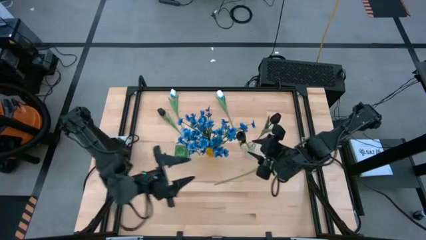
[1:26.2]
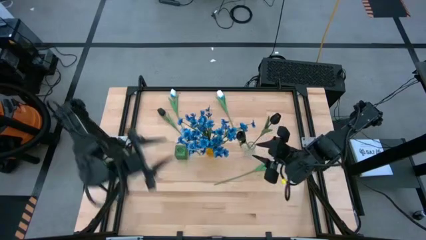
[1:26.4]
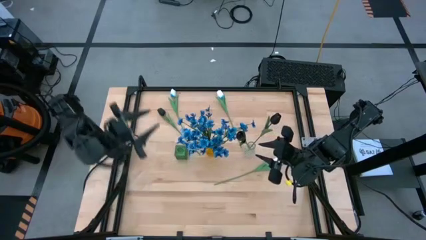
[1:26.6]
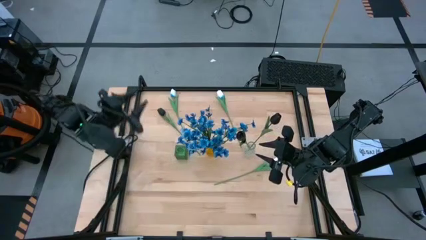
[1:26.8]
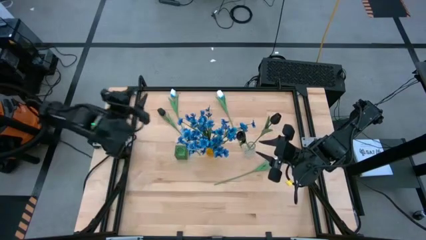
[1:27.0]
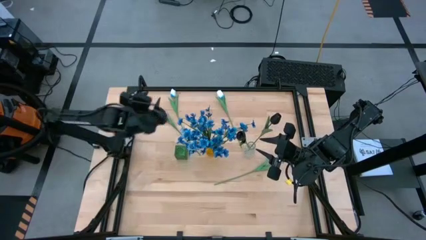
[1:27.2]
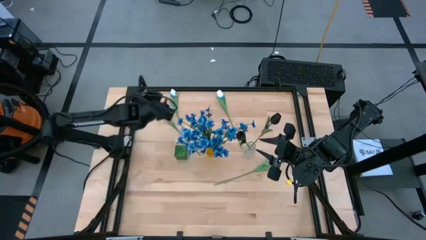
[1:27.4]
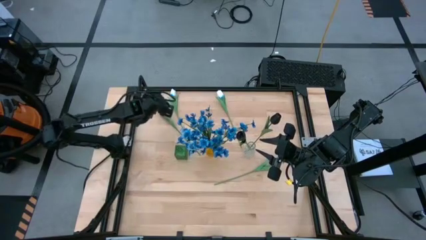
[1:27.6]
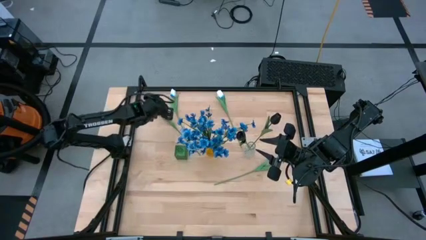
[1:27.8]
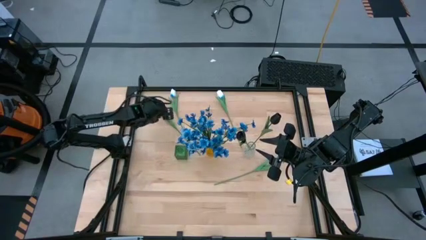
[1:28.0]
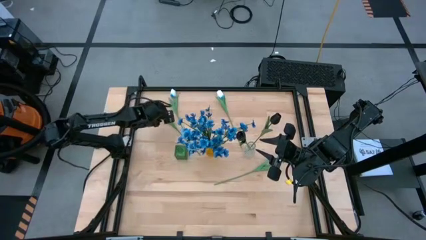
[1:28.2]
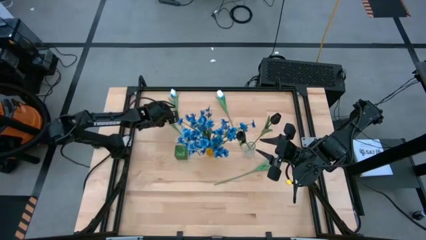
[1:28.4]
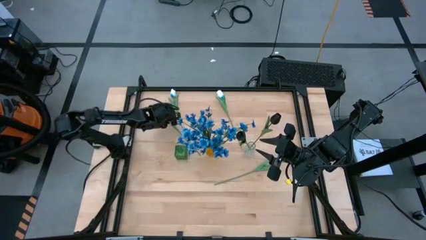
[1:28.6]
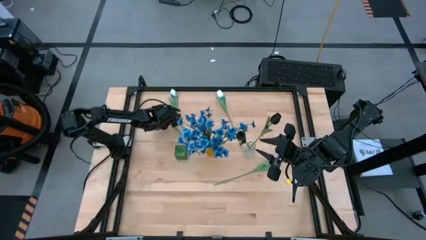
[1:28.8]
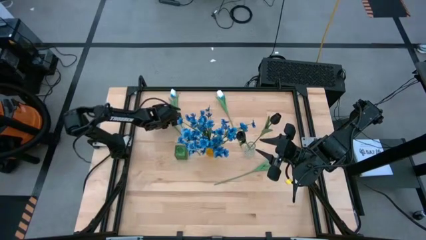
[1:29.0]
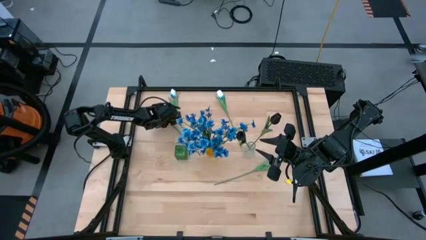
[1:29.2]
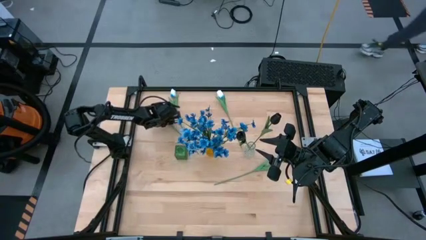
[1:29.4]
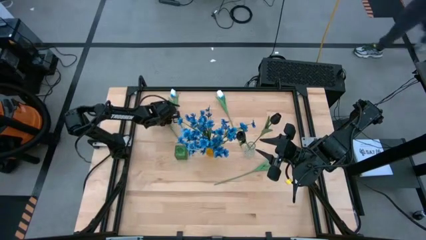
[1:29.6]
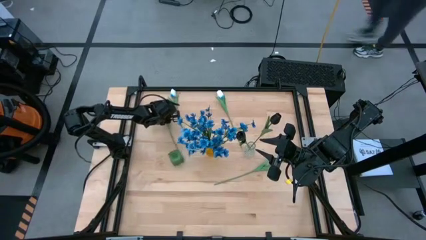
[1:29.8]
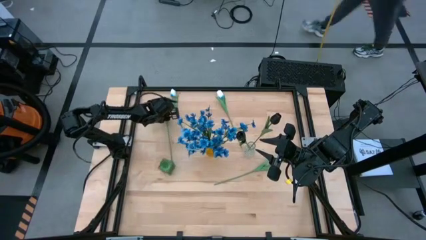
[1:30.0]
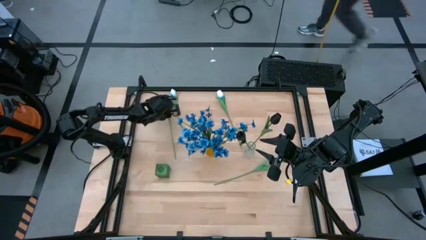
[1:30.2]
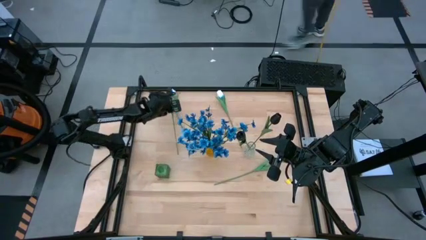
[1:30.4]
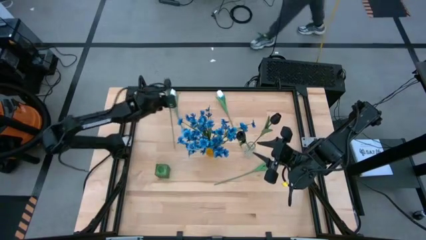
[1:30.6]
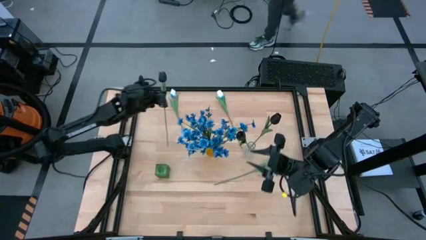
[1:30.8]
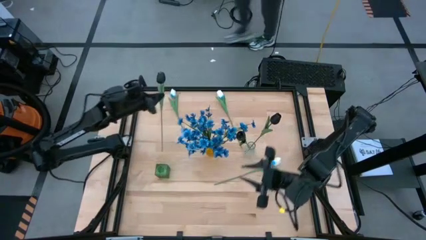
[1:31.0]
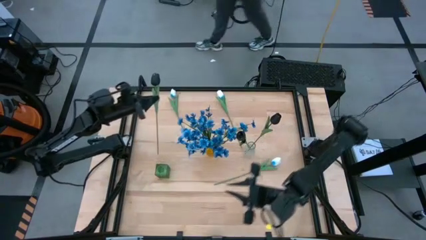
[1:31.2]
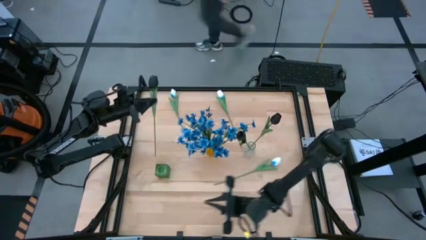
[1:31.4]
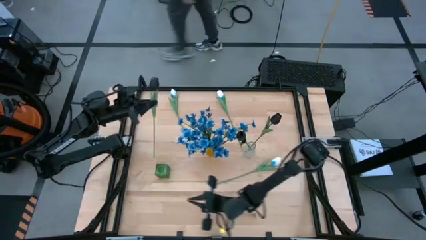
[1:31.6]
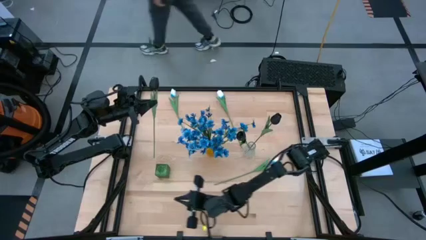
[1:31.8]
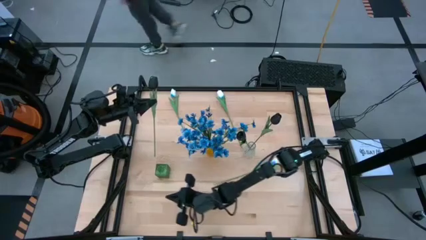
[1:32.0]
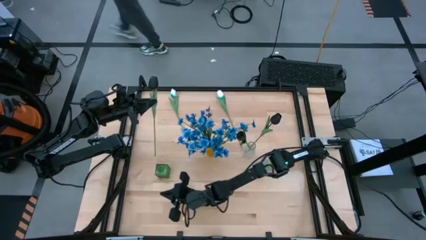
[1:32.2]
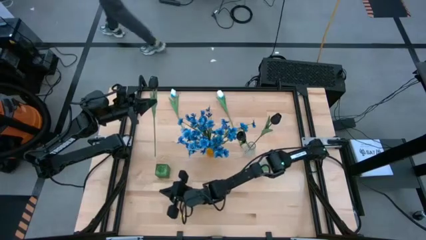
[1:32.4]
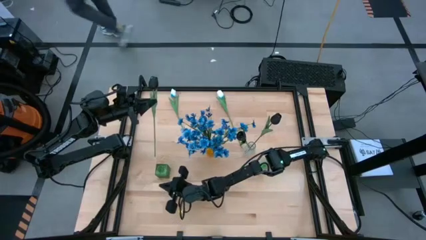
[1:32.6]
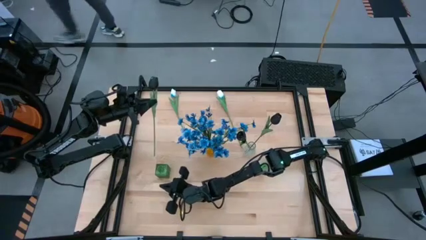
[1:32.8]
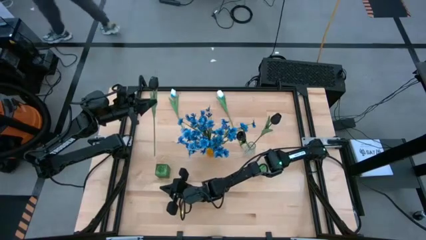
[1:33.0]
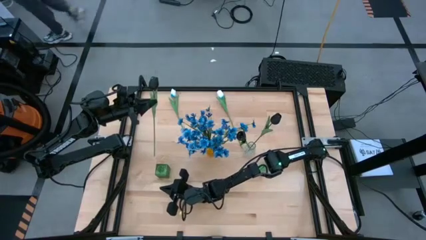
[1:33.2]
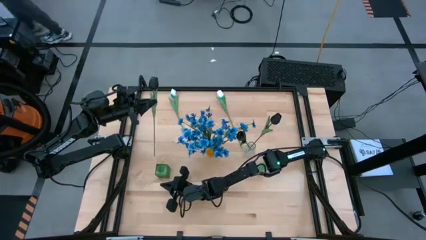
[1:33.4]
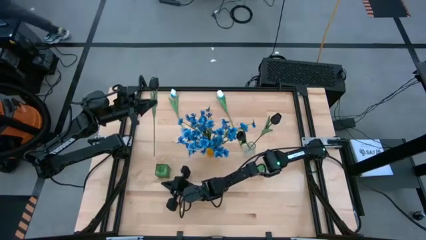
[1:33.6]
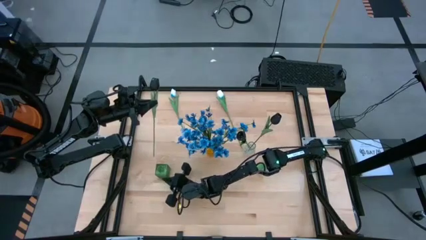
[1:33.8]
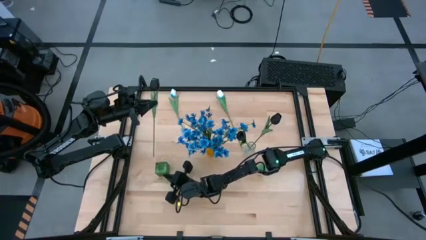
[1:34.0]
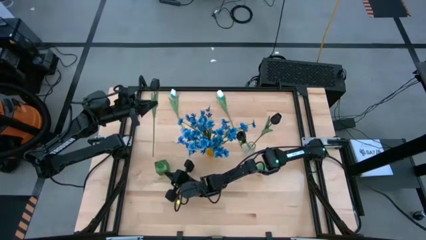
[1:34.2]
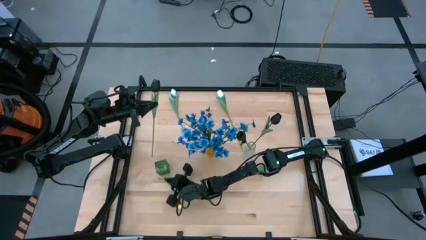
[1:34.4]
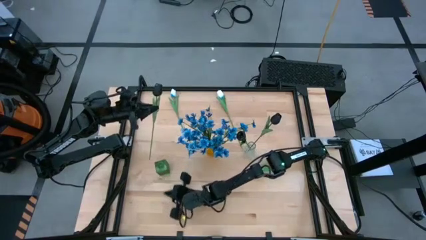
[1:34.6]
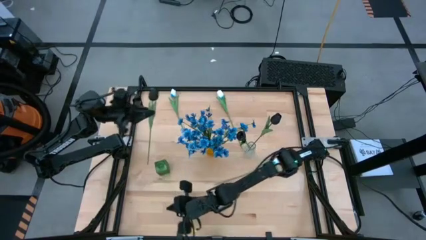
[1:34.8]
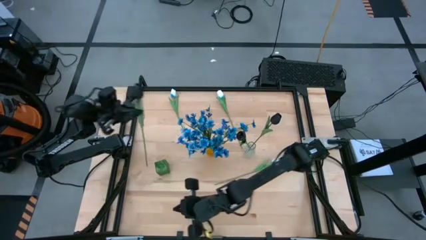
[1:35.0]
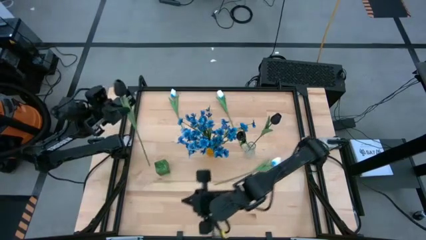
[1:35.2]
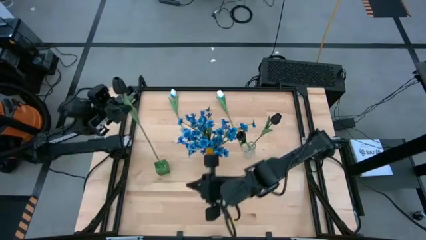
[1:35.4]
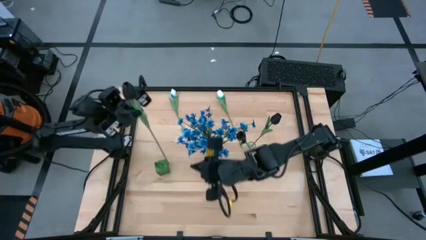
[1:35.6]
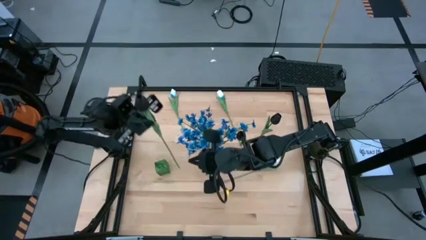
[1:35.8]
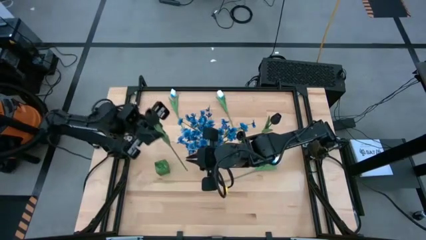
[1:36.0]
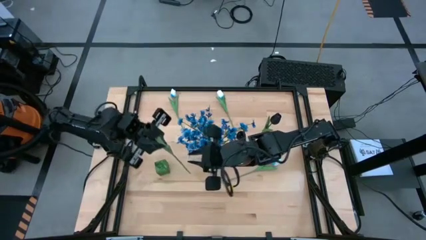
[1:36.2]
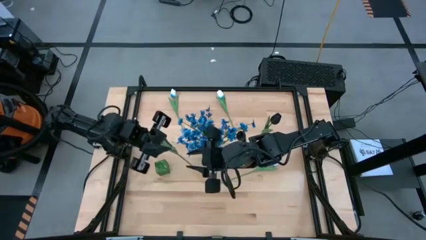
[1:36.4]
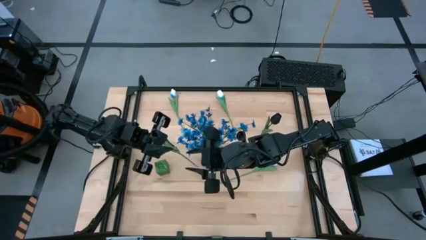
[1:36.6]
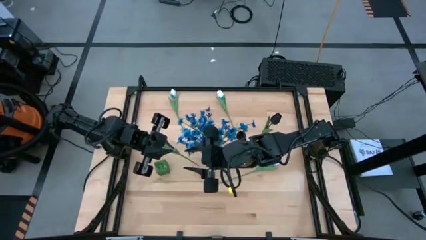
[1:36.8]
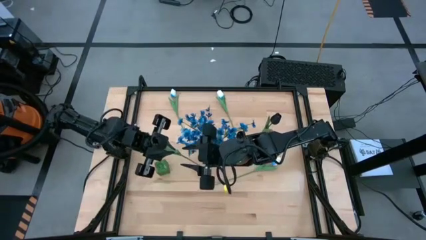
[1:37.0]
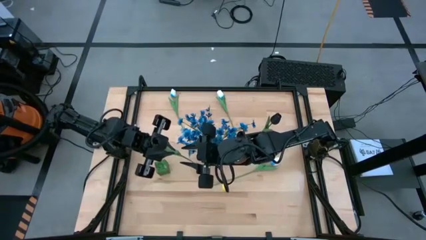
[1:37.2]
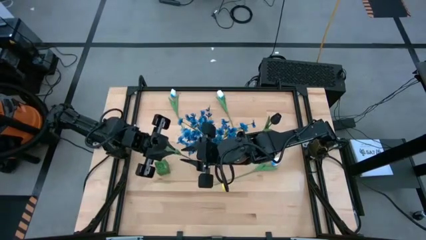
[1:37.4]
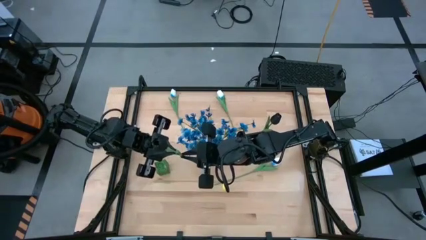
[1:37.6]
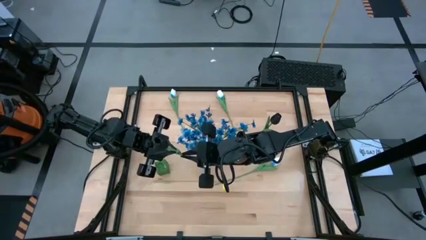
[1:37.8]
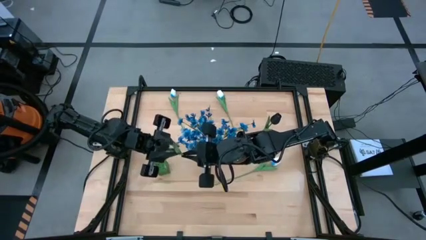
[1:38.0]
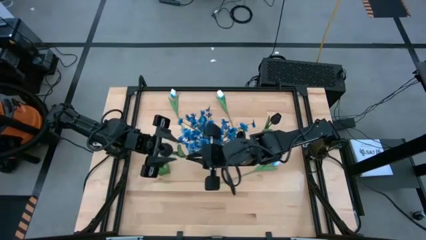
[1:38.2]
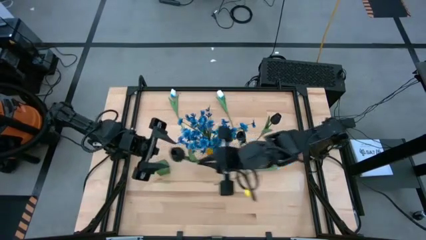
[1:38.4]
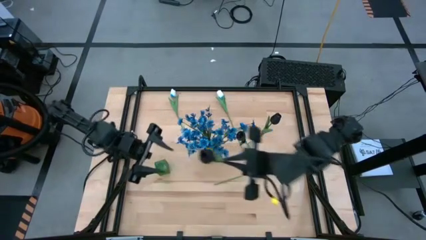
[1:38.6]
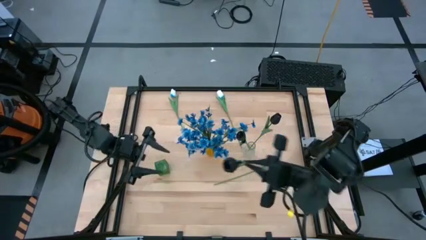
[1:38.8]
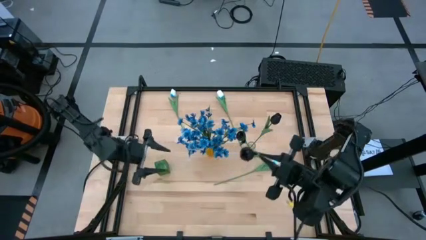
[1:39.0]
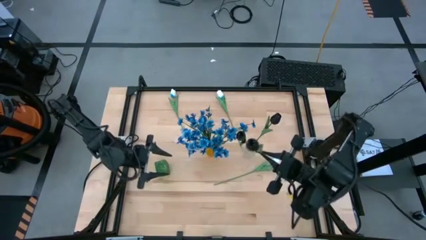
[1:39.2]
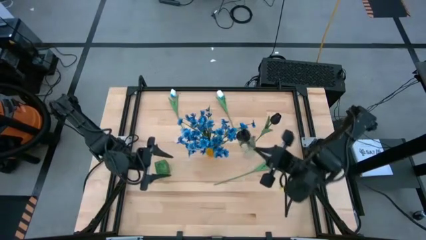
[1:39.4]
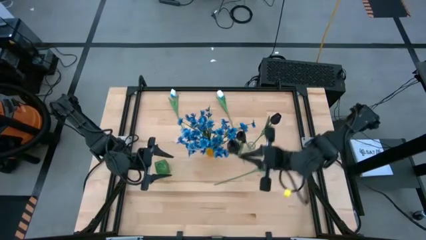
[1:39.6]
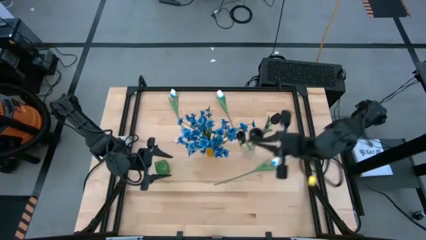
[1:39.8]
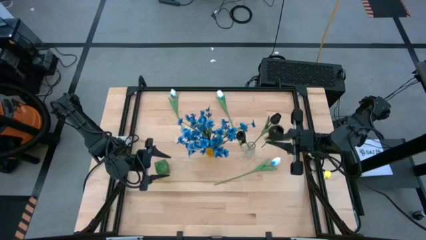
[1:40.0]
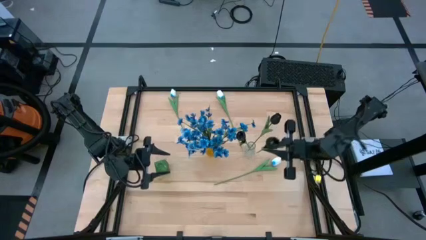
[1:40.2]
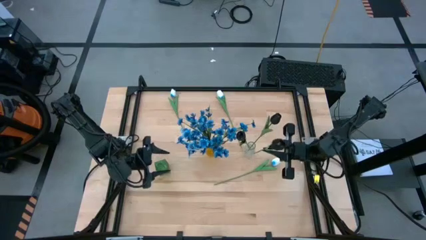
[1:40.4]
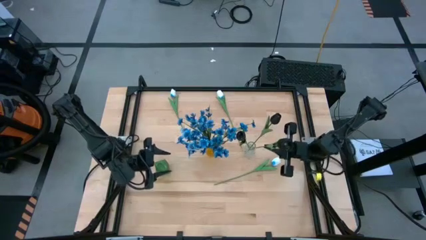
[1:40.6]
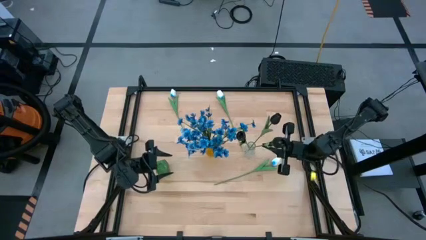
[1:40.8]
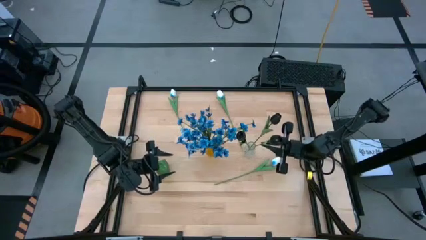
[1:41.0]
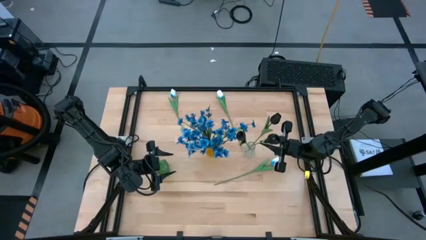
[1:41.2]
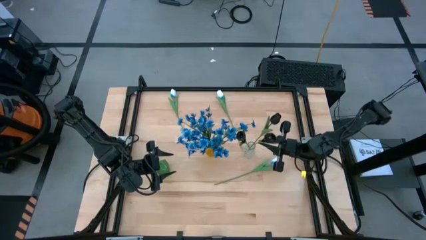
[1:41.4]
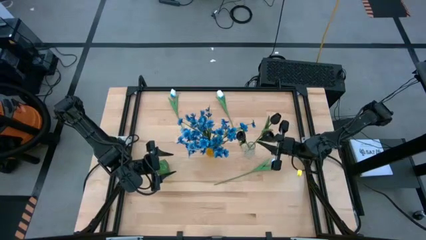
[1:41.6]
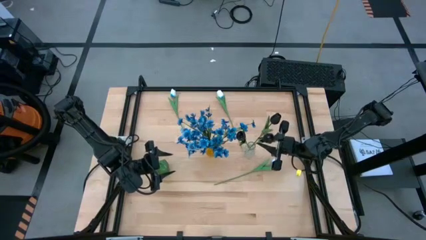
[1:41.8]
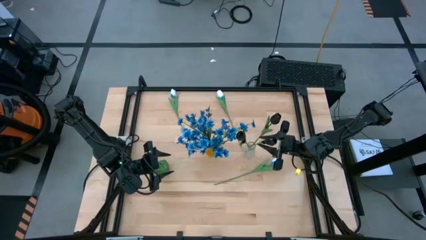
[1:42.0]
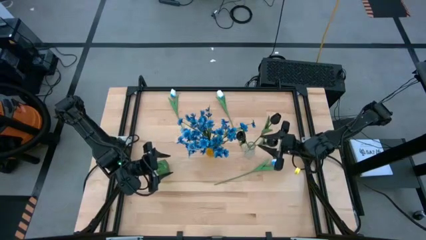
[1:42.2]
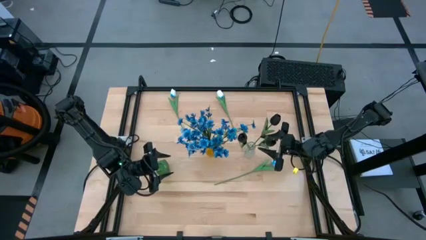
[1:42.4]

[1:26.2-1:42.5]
Task: Sort flowers into vase by color
Put the black flower into the transparent vase

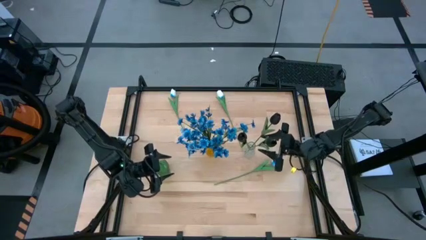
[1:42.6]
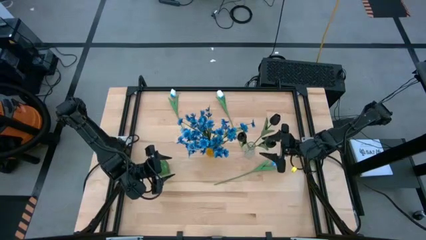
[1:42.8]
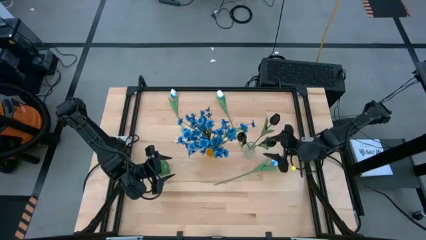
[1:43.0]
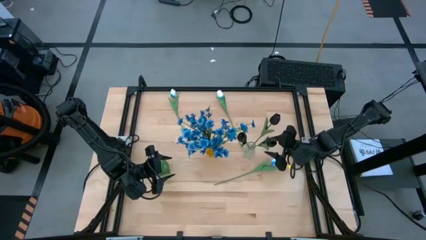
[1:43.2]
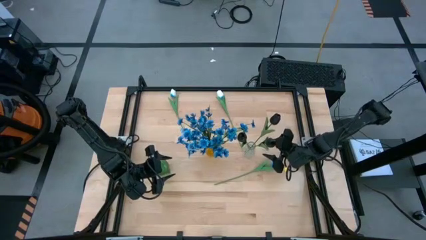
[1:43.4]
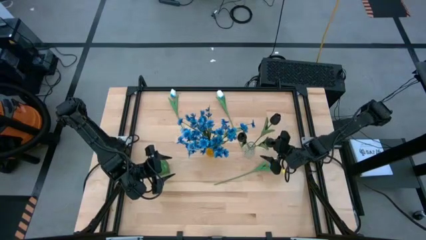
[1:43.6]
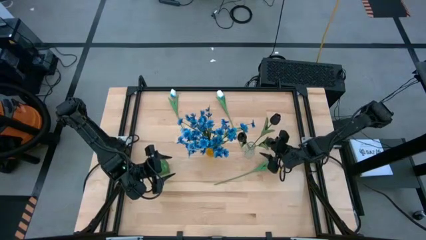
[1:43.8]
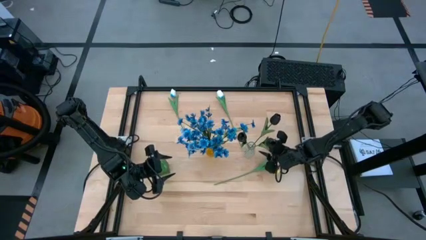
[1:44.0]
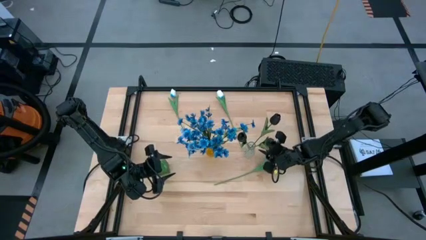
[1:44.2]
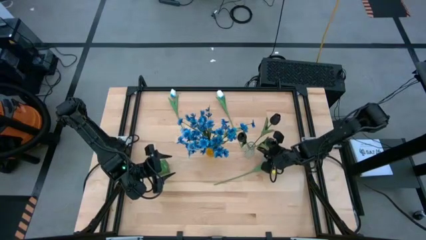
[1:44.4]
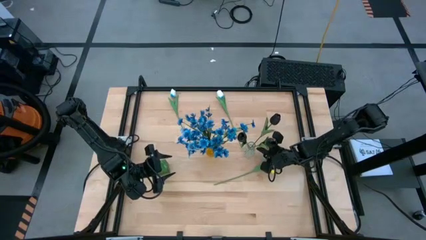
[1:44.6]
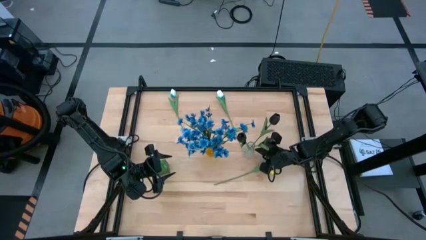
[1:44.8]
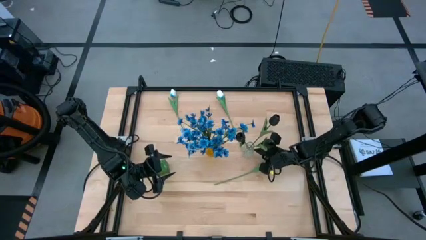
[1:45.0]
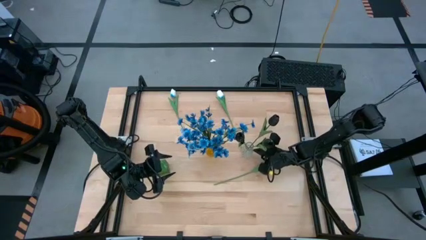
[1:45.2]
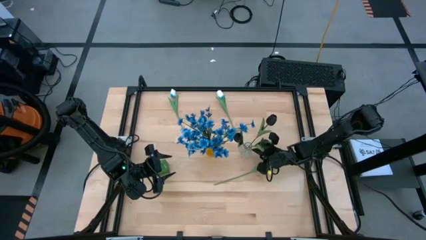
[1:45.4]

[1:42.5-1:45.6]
Adjust the transparent vase on the table
